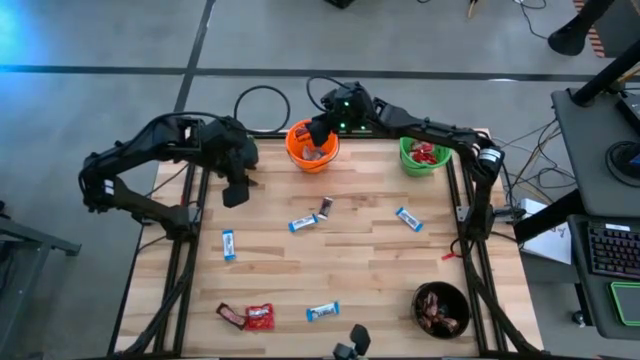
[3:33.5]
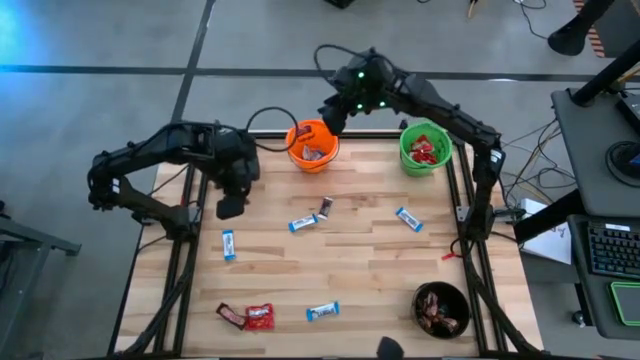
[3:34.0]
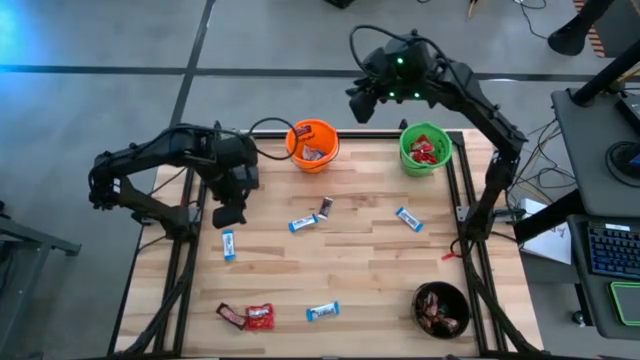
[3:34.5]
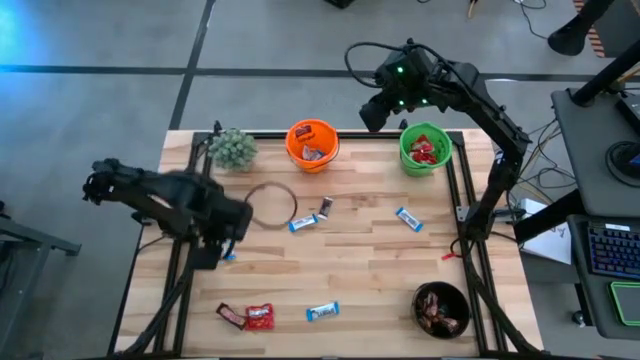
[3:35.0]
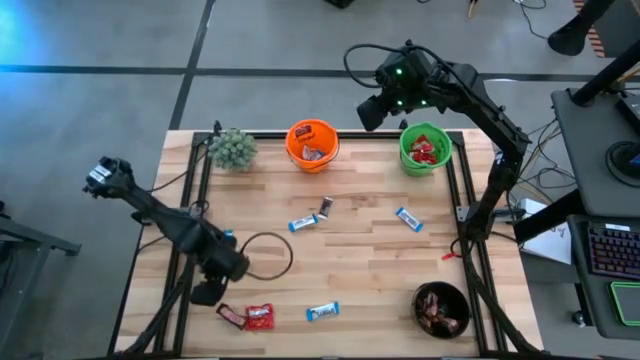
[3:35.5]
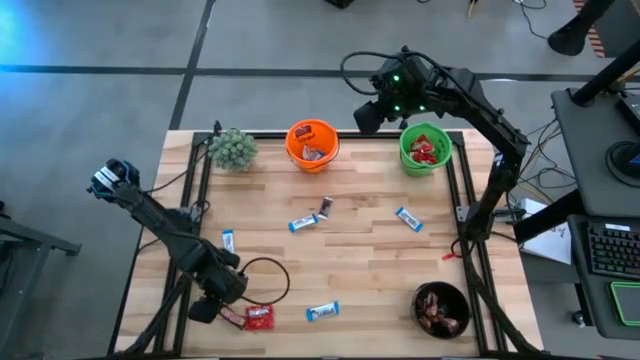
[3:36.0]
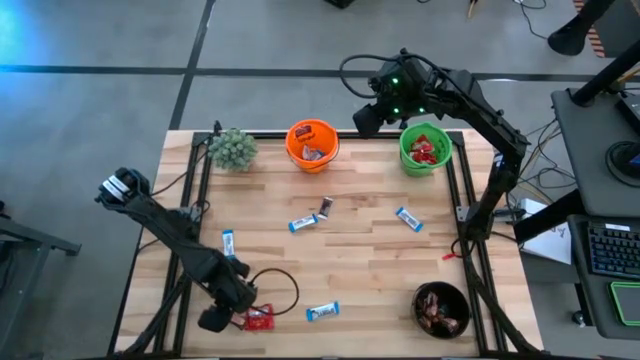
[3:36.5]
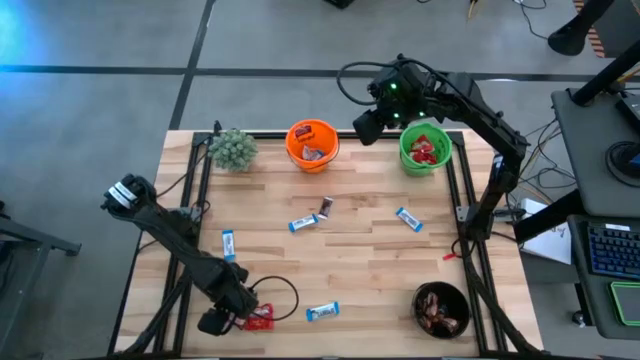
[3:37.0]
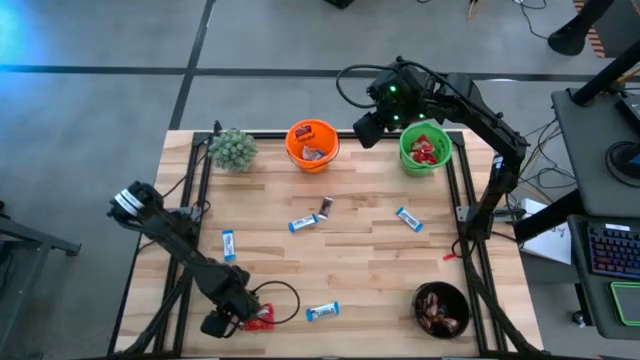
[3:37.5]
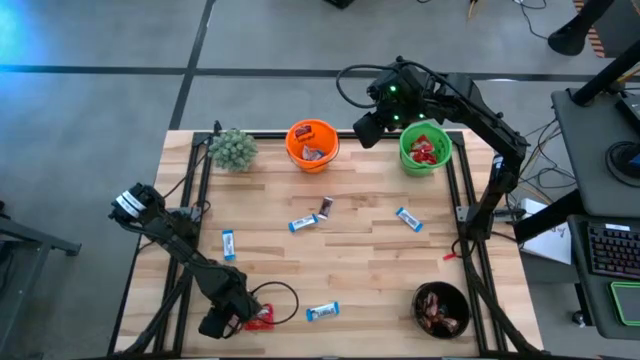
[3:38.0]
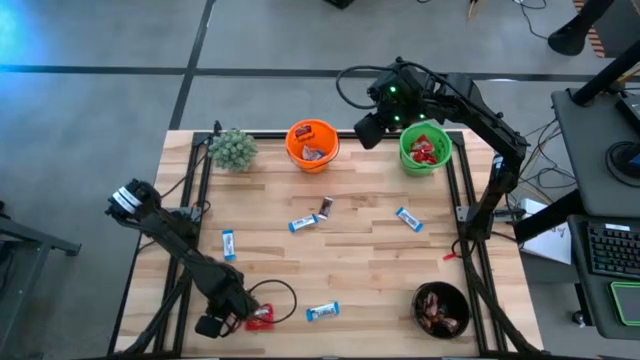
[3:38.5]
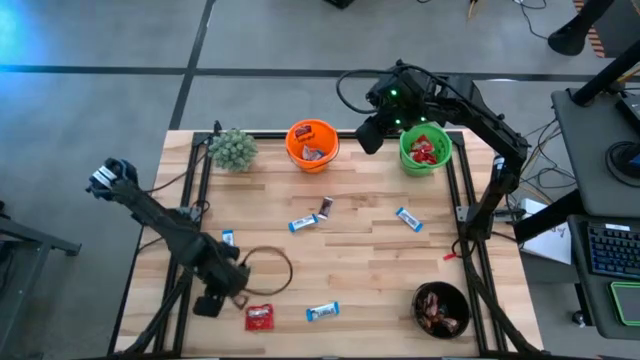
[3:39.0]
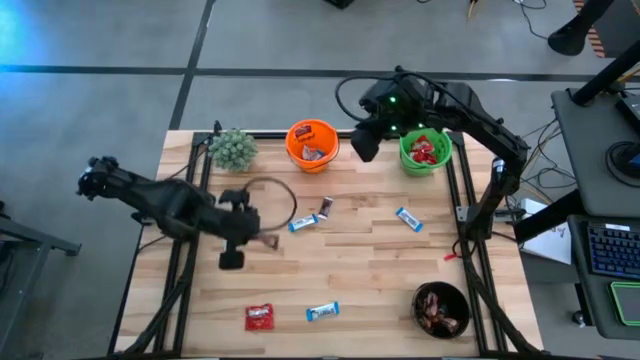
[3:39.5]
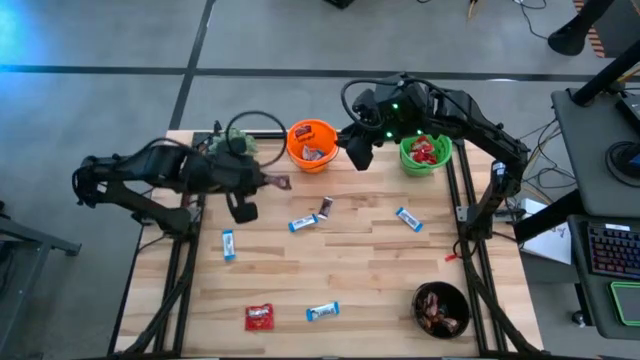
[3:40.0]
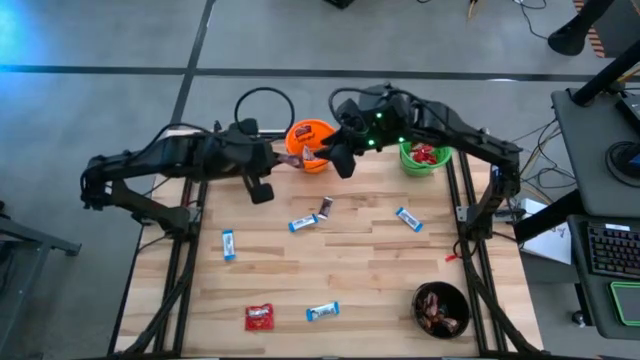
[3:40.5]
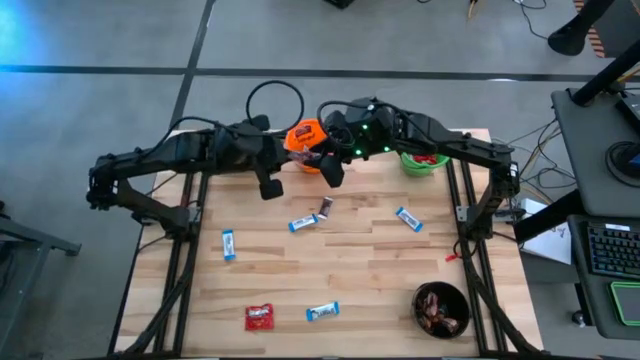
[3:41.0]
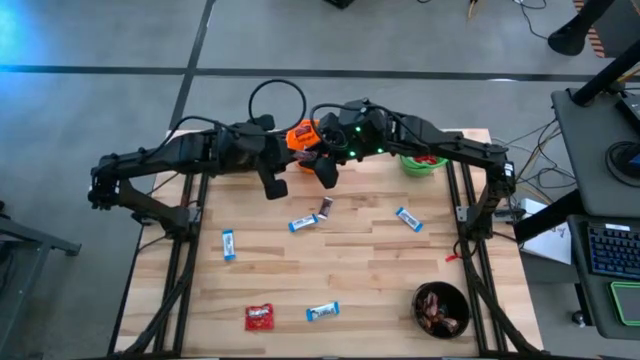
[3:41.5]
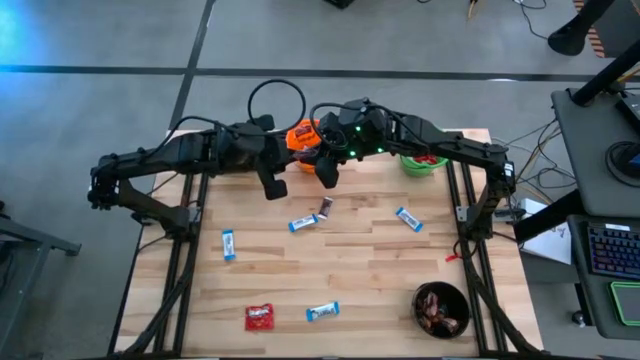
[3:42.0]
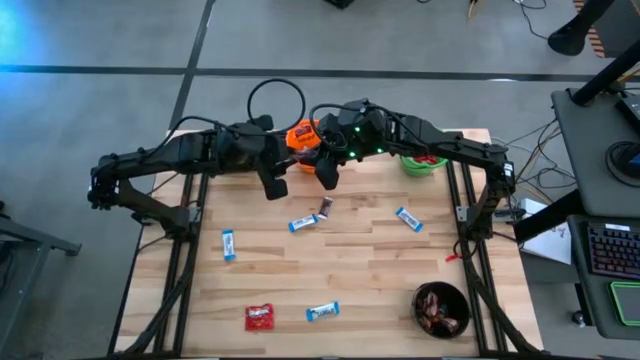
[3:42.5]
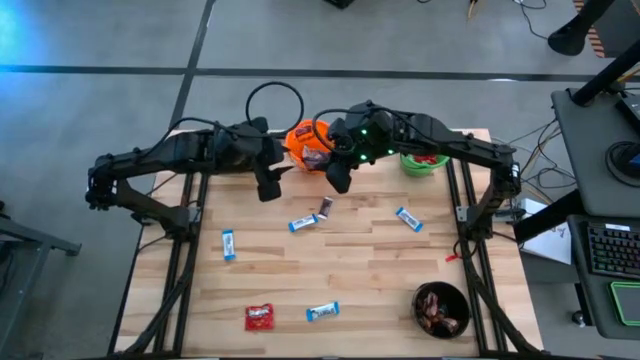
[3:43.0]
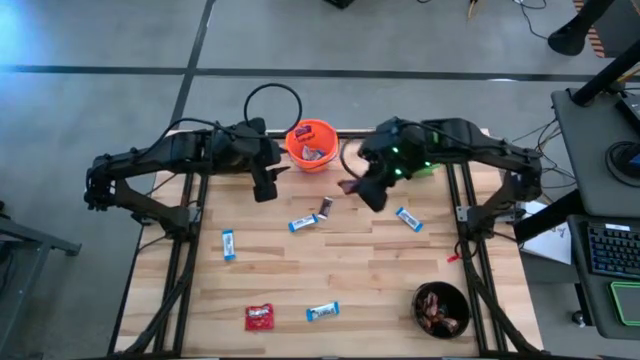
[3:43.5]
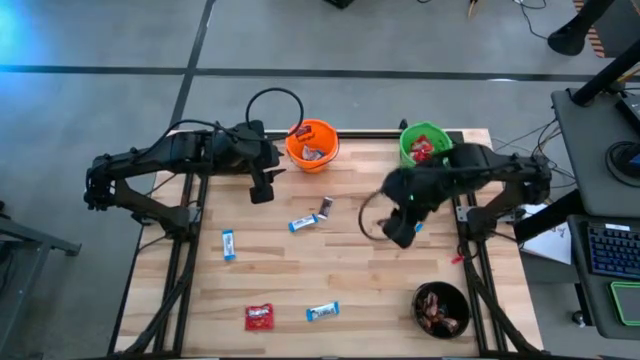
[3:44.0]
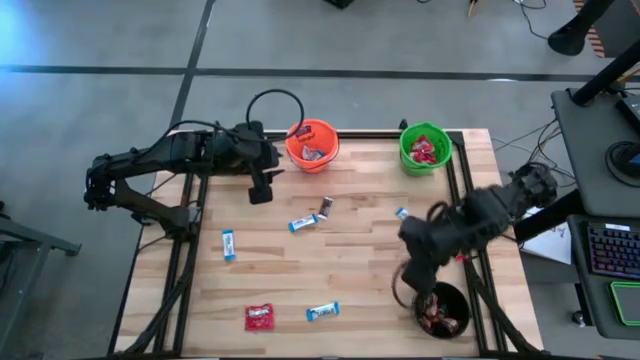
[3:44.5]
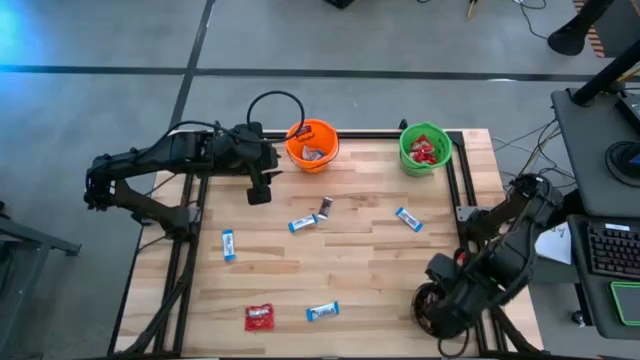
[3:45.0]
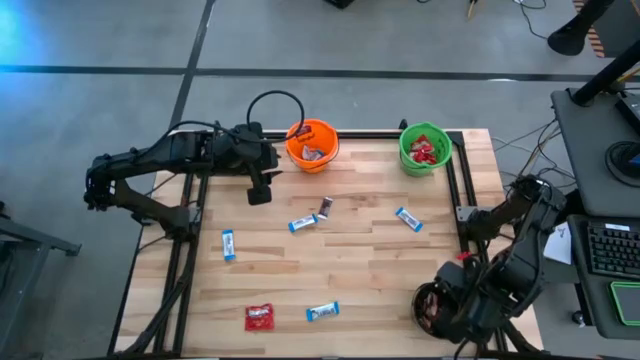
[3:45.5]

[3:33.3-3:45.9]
Task: Sort candy
Put the brown chocolate into the black bucket

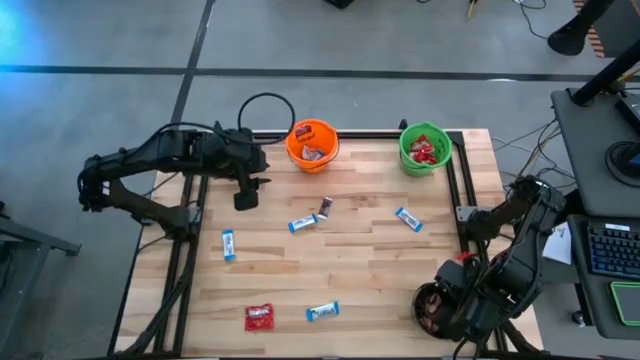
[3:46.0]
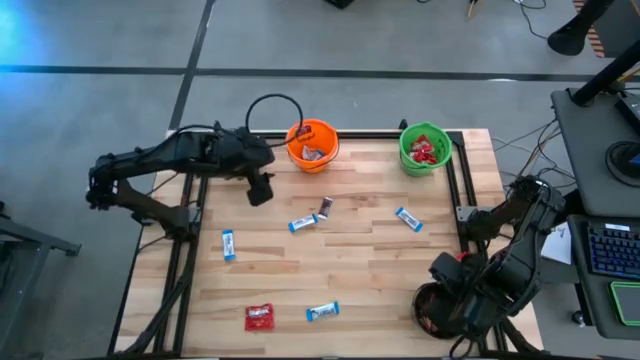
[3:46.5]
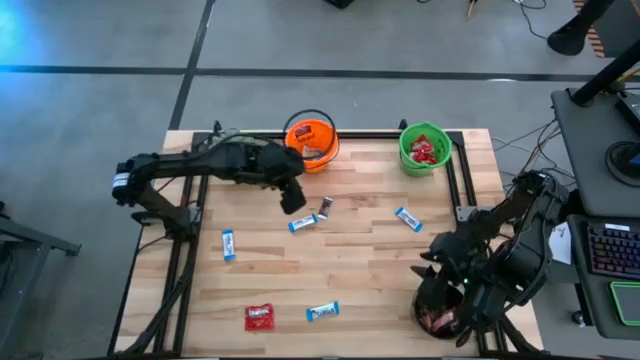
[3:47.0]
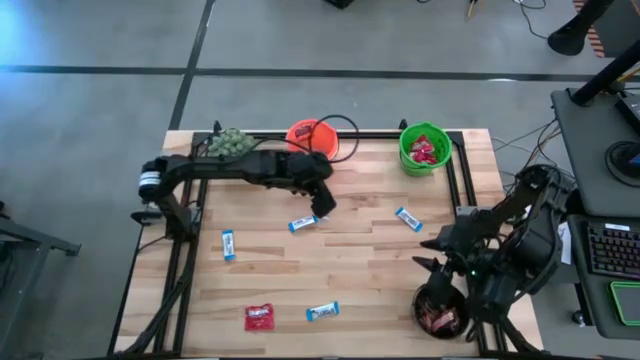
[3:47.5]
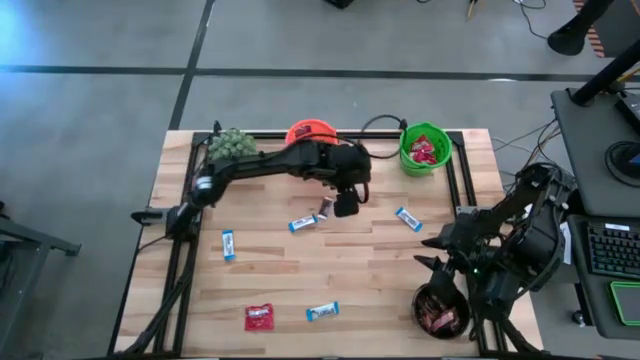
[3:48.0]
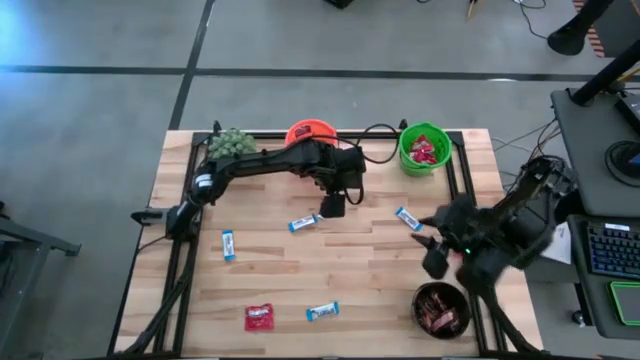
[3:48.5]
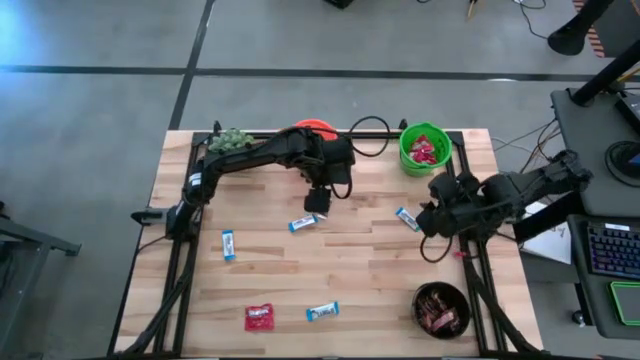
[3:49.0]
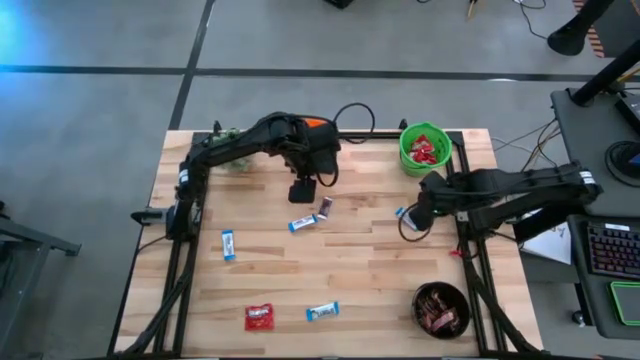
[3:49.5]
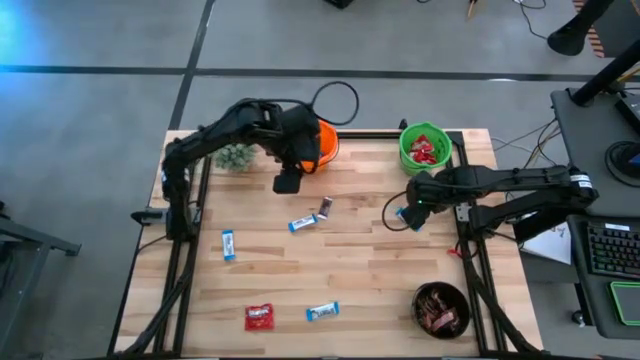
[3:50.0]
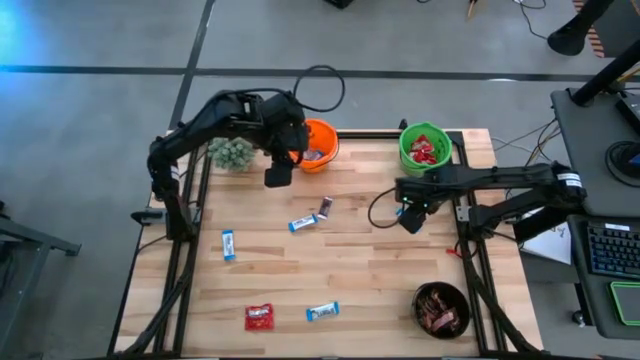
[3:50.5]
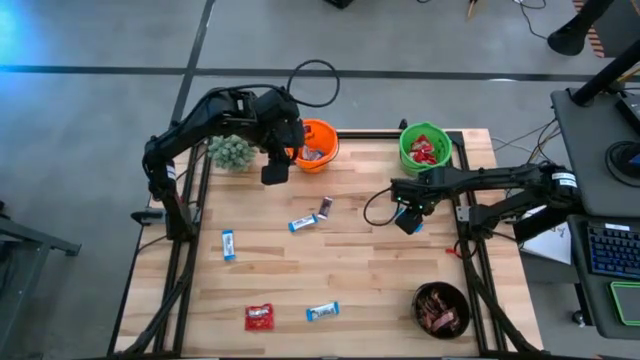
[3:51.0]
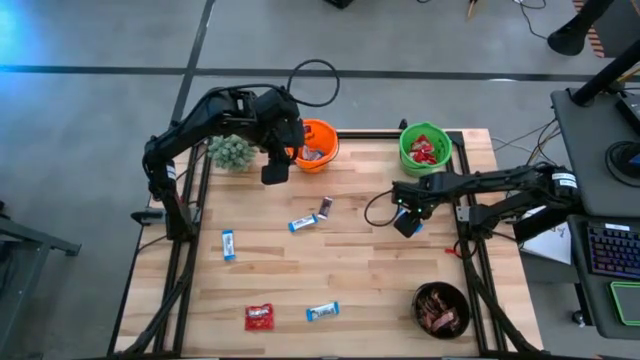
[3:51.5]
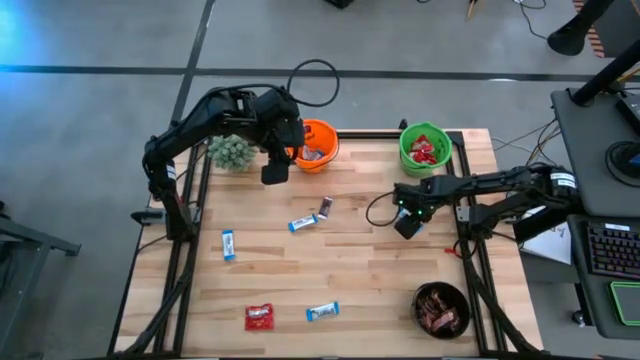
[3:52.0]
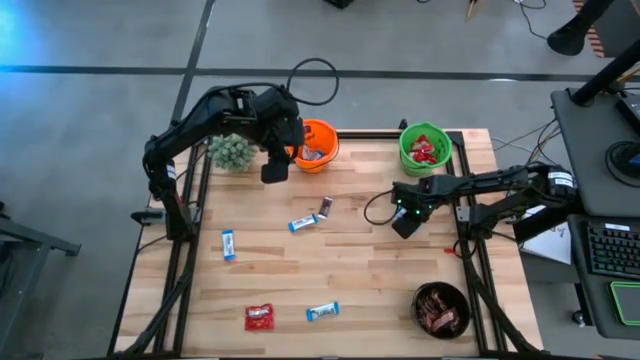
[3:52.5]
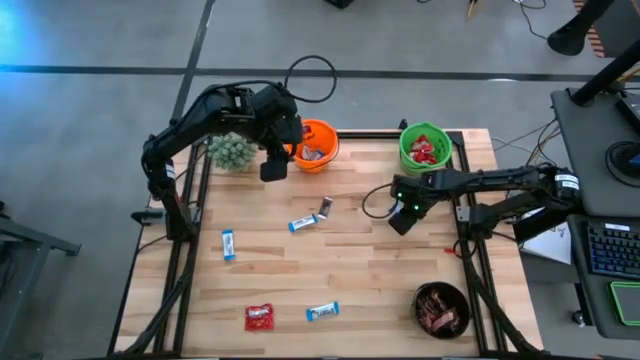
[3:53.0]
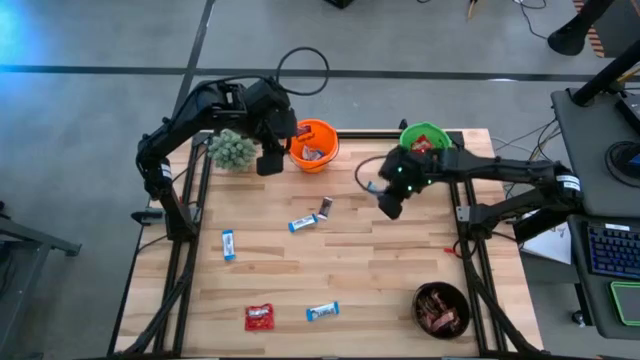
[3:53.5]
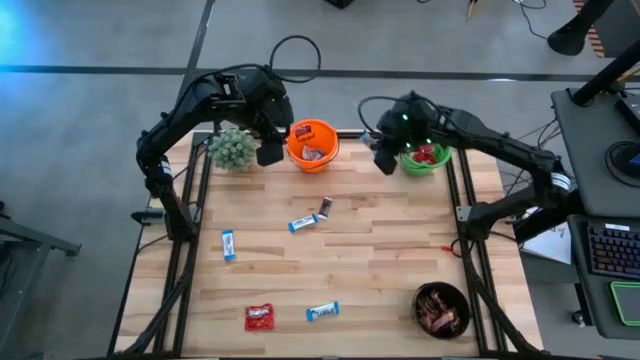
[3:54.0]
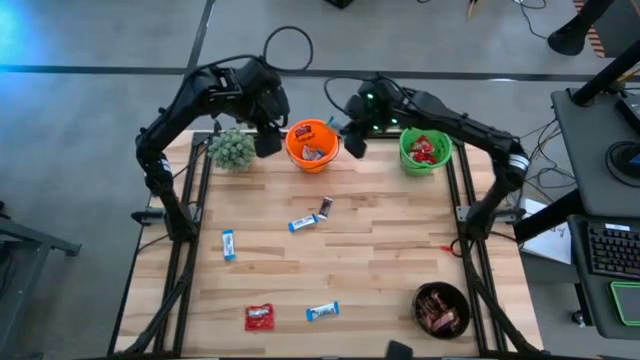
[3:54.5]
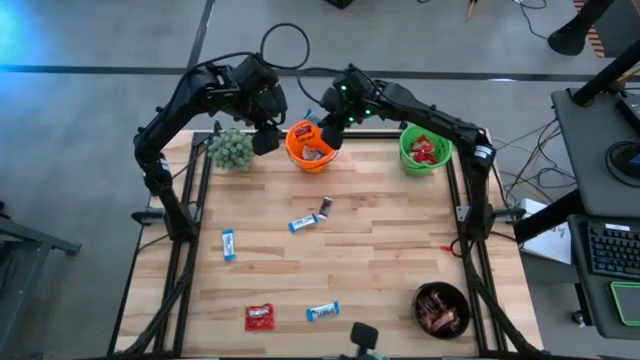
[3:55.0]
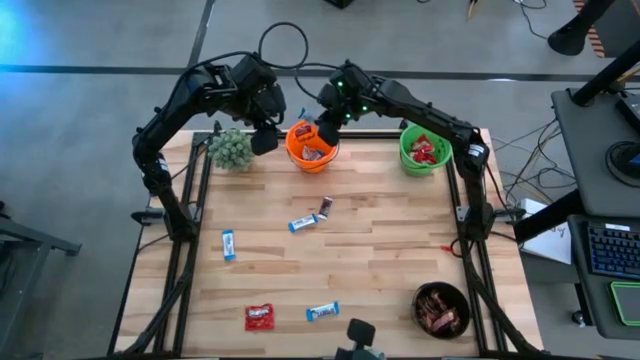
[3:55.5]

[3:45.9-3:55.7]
Put the white chocolate into the orange bucket
